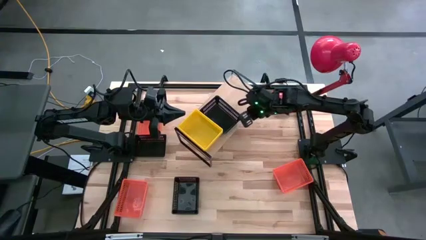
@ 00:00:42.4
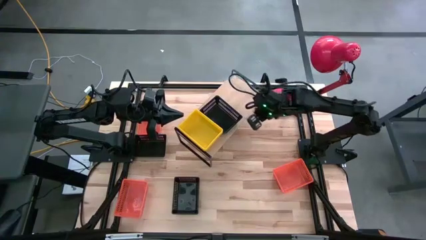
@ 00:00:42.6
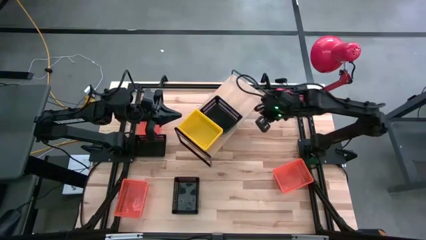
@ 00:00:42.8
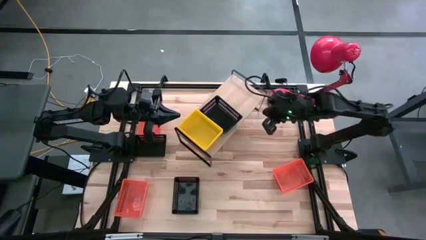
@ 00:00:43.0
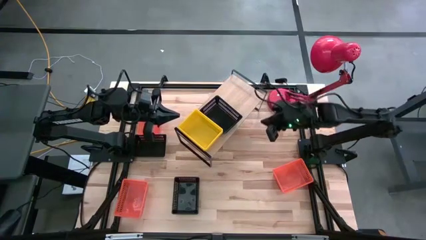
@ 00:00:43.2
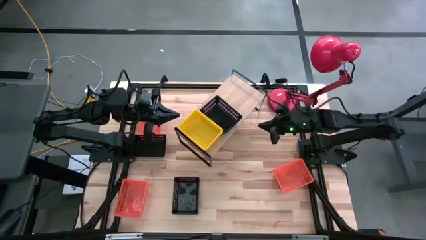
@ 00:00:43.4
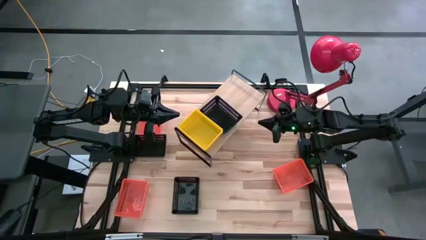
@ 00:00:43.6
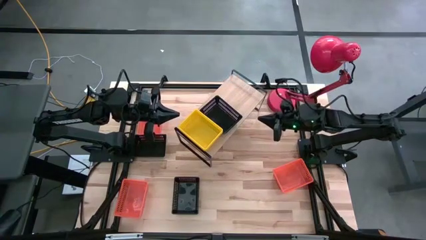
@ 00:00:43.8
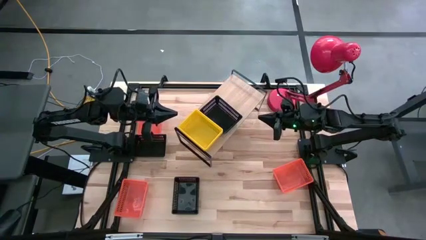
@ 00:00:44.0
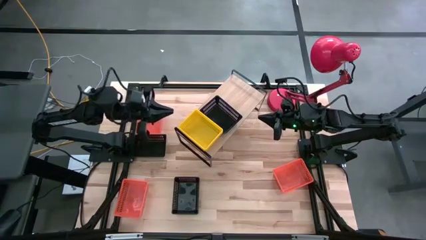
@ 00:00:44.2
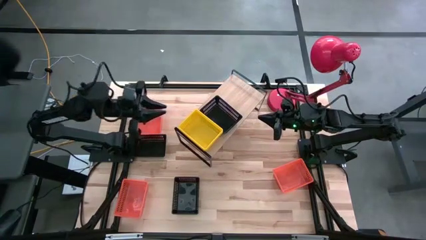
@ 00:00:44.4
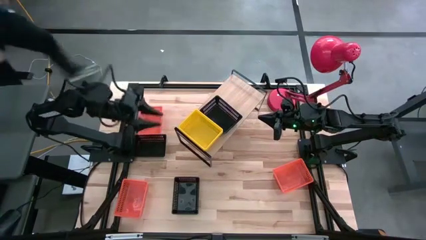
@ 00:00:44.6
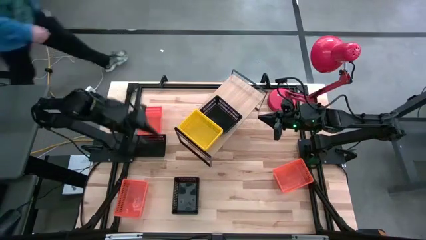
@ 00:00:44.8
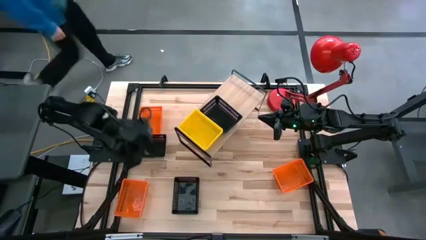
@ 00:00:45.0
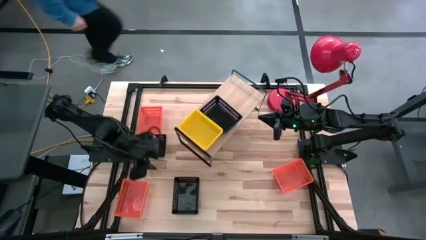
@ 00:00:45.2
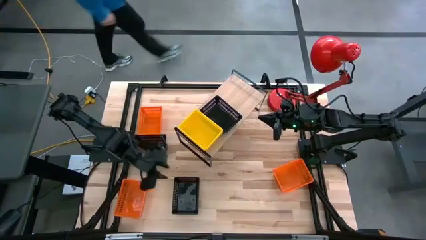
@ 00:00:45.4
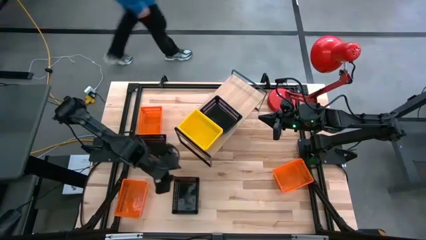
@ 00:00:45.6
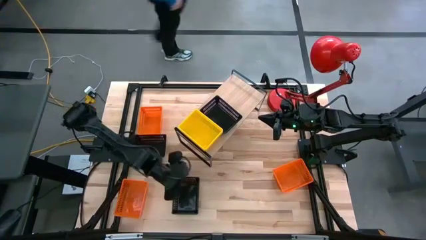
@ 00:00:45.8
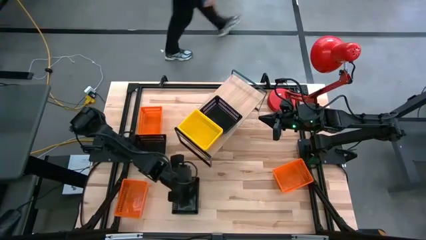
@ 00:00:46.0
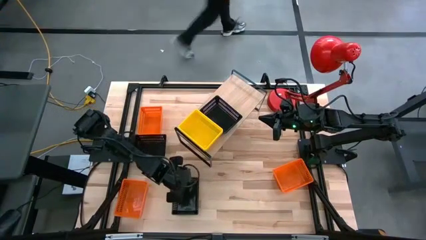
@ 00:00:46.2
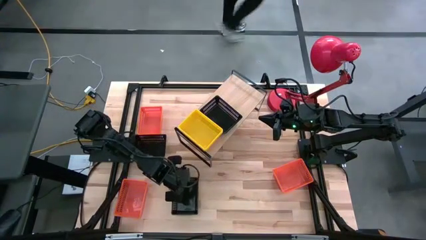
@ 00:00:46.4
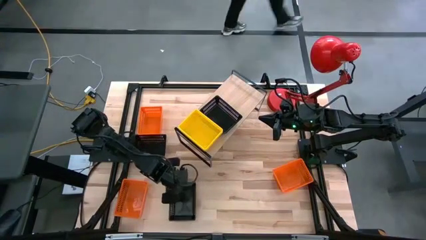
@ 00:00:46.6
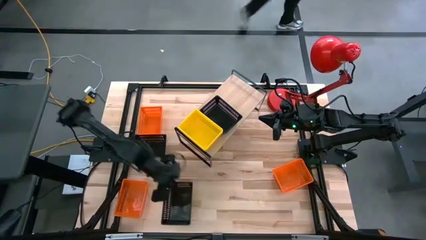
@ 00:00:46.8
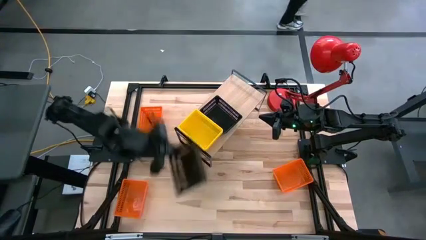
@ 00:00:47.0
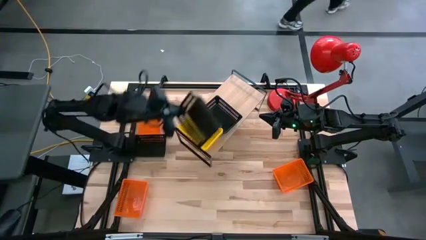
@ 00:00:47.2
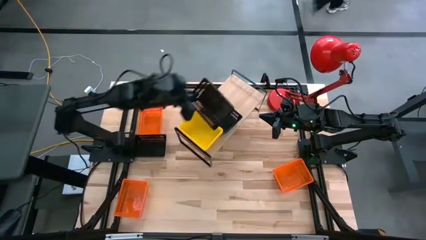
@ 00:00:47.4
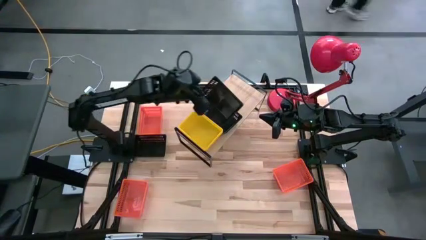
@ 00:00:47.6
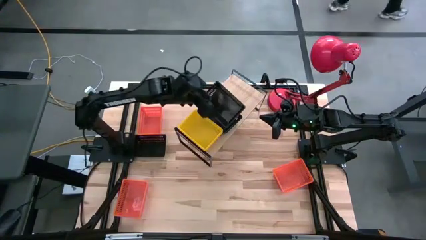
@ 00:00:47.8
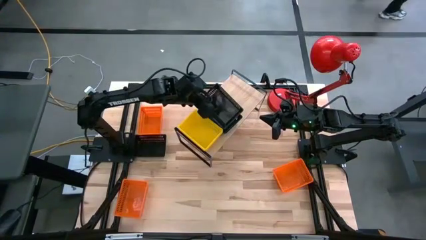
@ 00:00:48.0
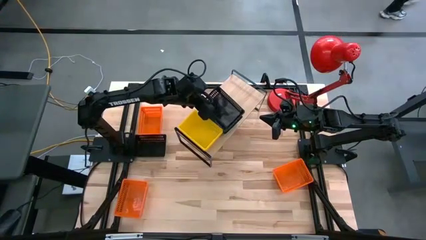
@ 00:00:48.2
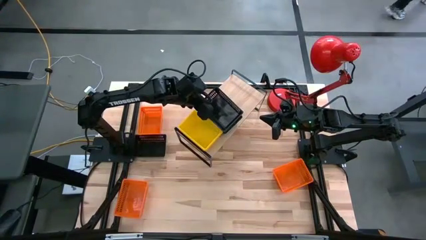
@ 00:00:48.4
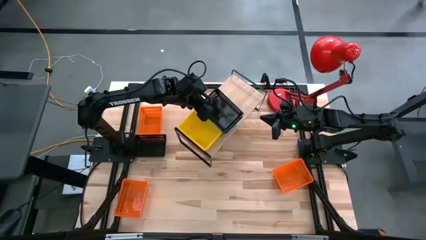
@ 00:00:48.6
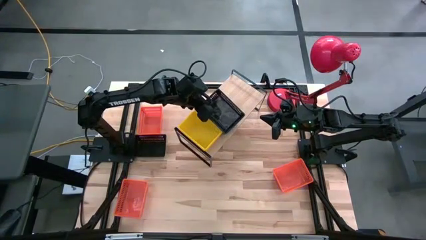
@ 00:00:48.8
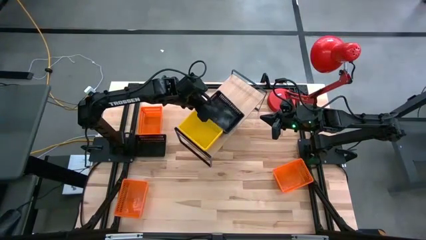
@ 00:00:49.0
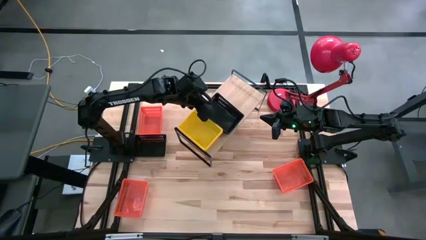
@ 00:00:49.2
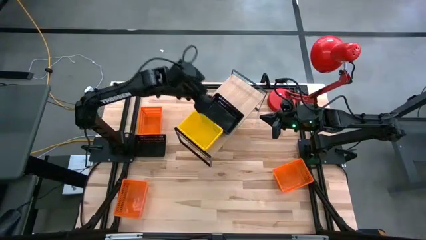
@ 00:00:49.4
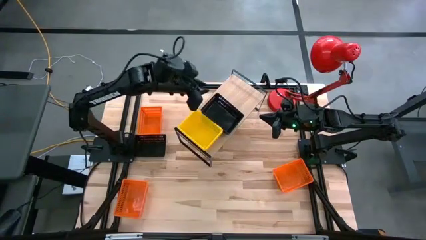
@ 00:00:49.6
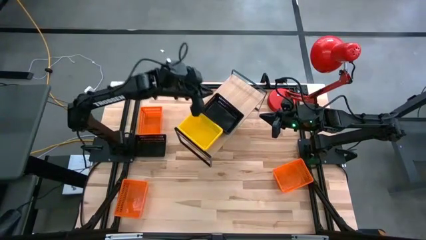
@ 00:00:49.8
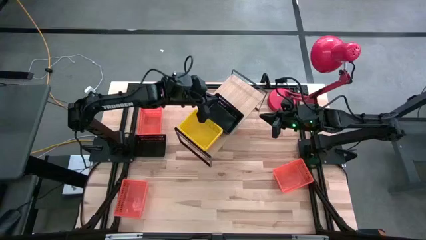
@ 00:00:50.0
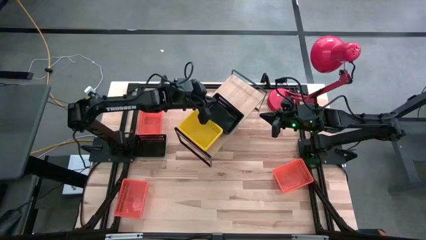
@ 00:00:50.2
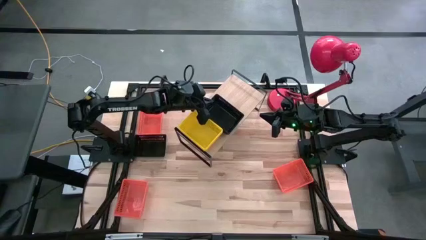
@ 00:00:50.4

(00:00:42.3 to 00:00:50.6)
Task: Stack baskets on shelf by color
Stack the bottom black bin on top of the black bin on the shelf

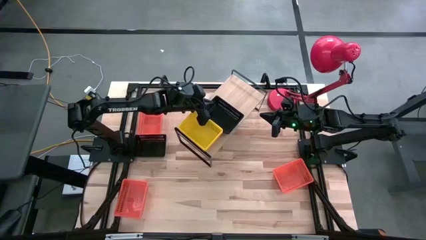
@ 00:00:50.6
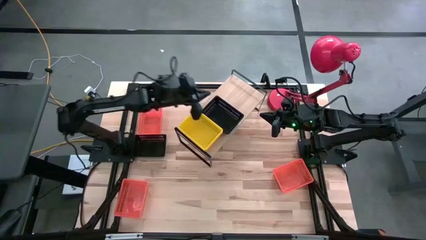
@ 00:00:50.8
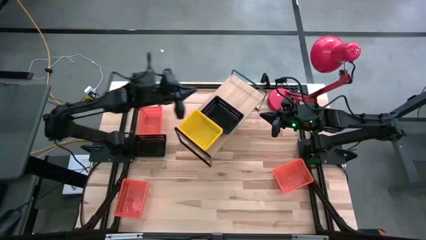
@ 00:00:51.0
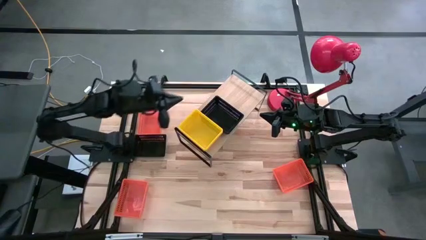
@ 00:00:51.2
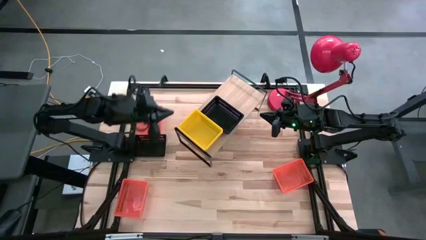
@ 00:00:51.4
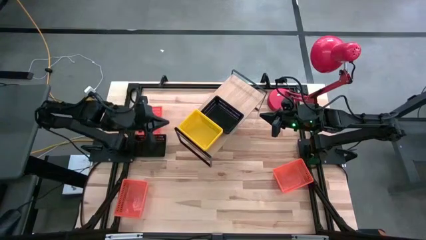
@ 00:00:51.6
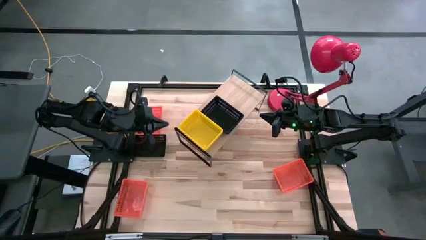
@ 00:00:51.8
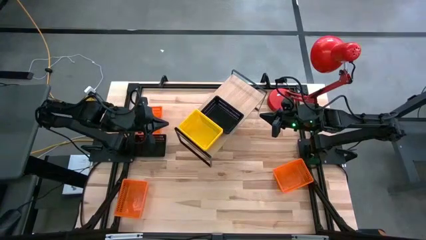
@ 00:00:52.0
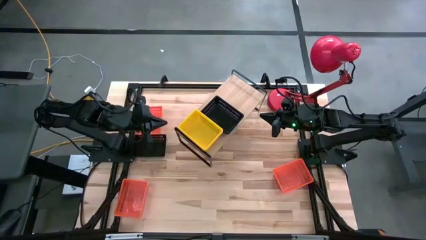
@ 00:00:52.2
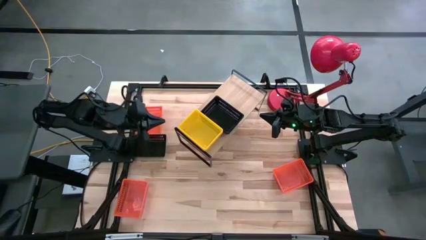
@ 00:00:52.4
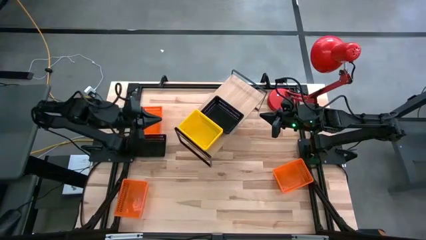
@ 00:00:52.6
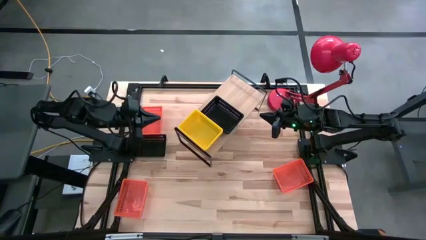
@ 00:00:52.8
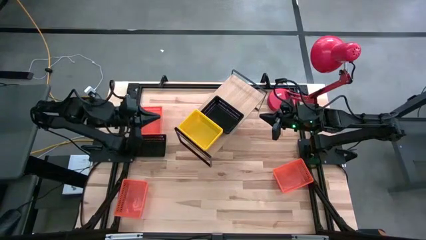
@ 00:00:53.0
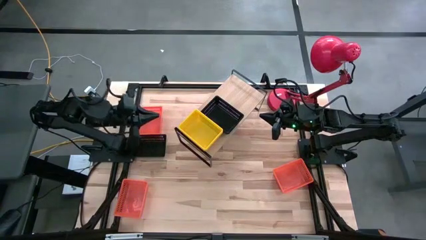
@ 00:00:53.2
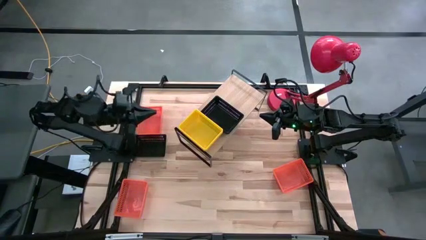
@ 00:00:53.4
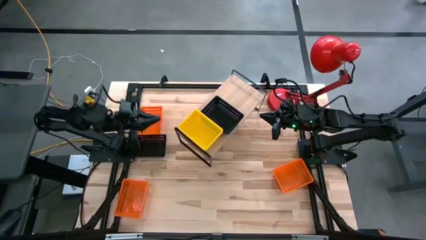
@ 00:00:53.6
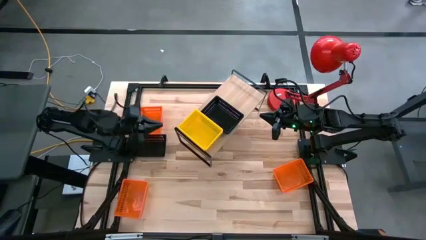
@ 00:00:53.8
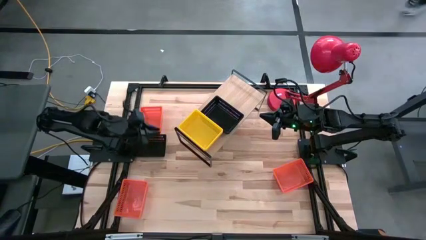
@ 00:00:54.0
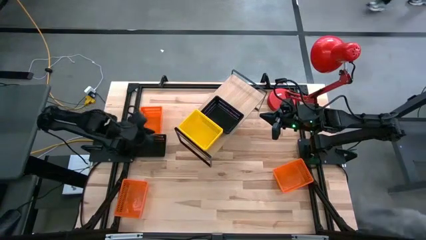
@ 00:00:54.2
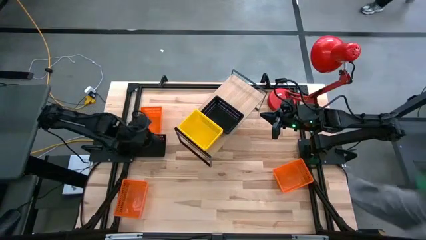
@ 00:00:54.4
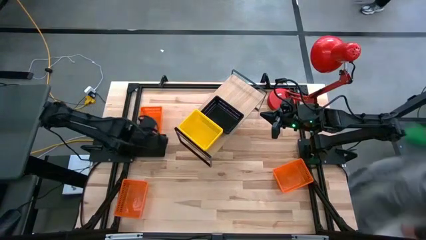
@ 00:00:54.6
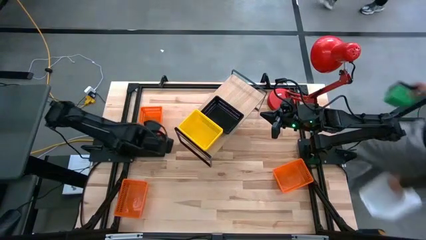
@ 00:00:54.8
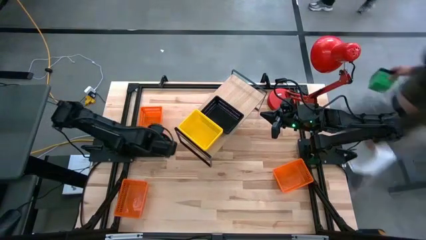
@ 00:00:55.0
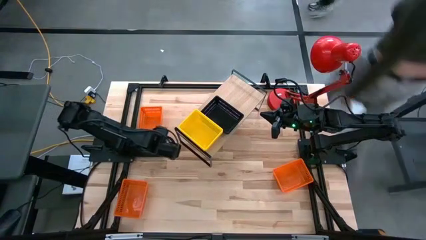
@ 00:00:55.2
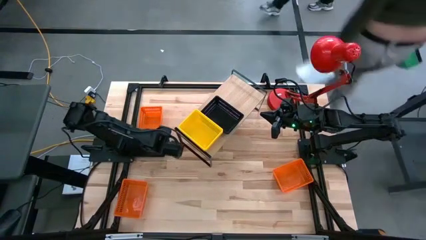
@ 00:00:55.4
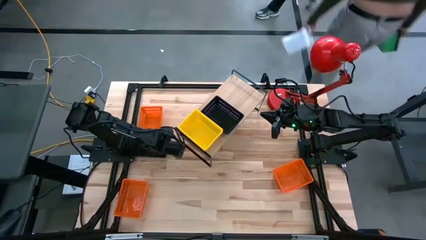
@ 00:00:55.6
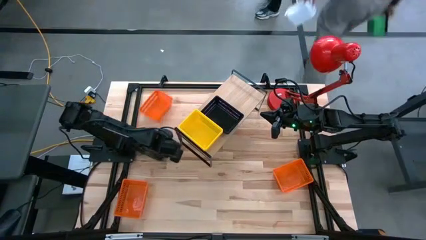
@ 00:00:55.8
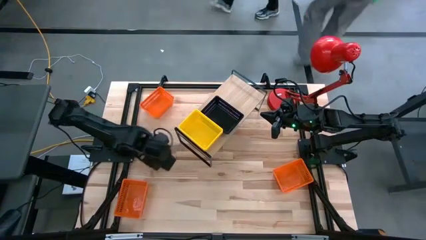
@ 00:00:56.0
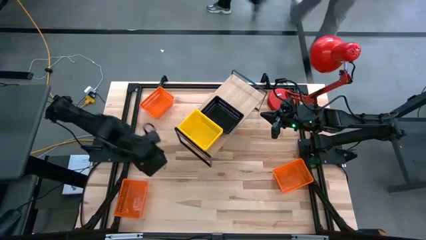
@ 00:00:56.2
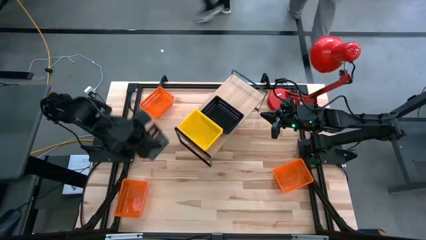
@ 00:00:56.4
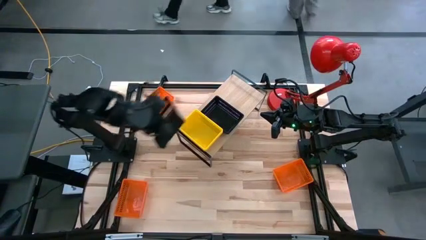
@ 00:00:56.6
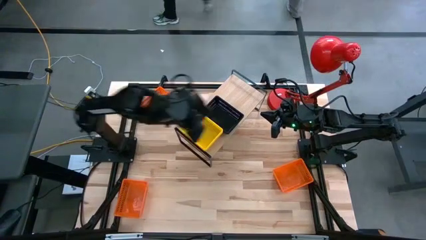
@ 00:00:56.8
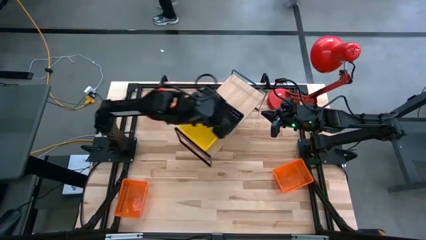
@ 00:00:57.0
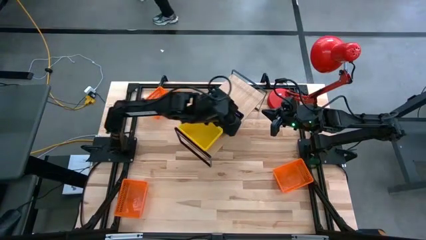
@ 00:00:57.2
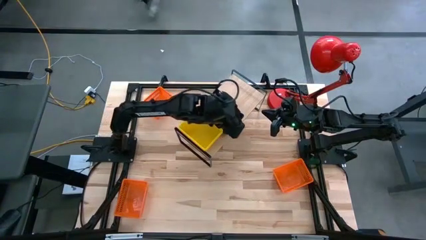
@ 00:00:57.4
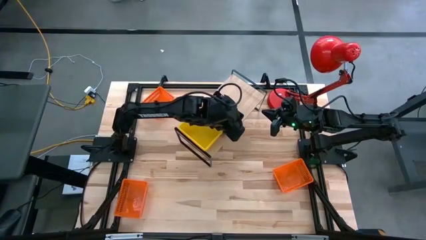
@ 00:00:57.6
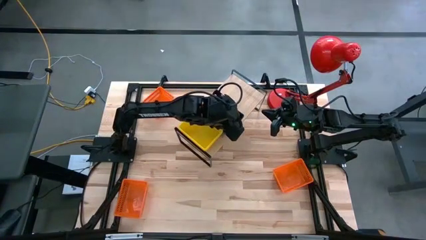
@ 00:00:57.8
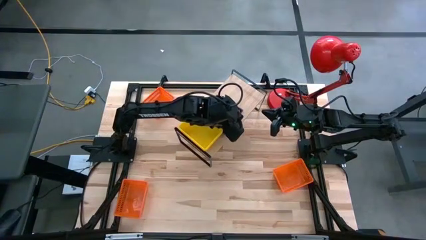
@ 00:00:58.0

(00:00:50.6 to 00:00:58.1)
Stack the black bin on top of the black bin on the shelf

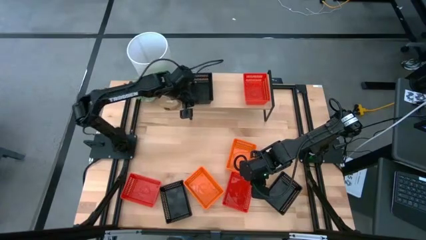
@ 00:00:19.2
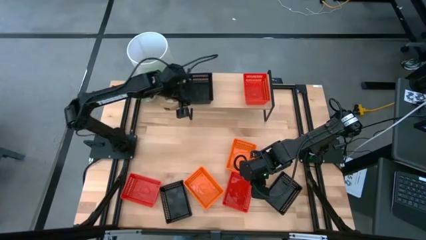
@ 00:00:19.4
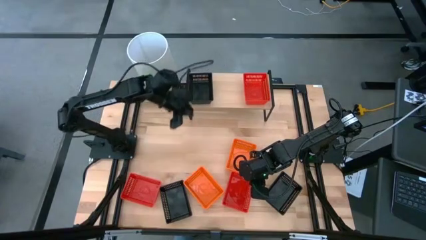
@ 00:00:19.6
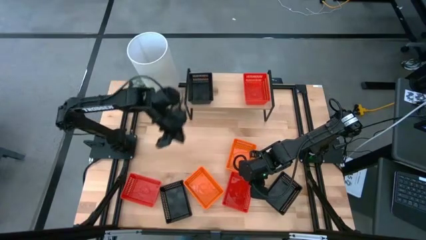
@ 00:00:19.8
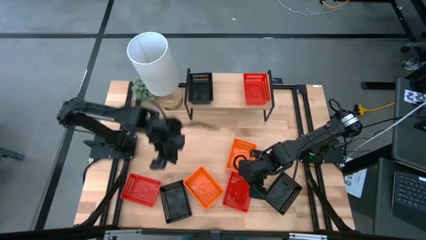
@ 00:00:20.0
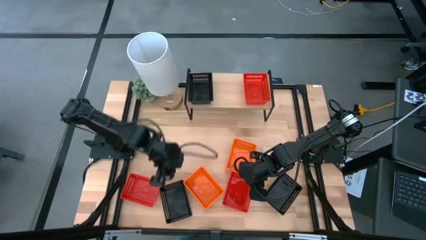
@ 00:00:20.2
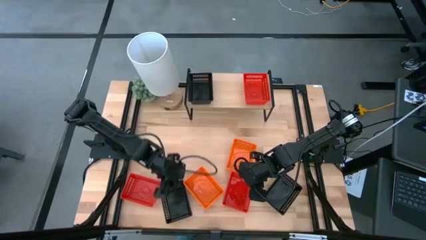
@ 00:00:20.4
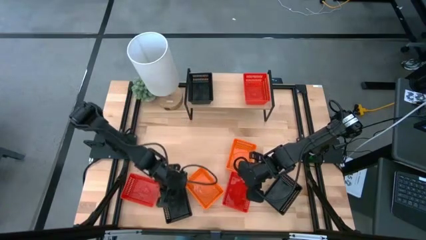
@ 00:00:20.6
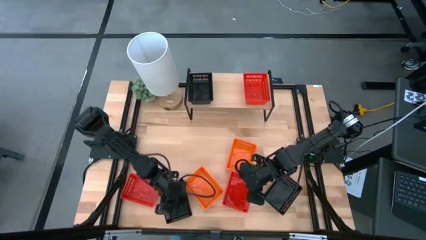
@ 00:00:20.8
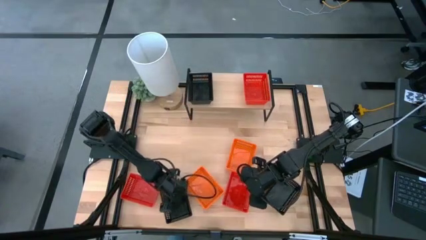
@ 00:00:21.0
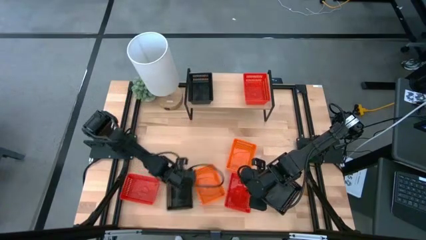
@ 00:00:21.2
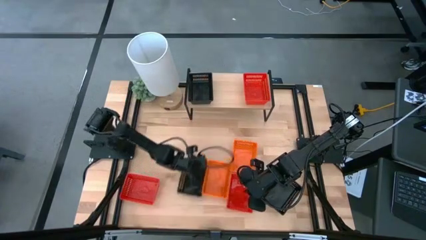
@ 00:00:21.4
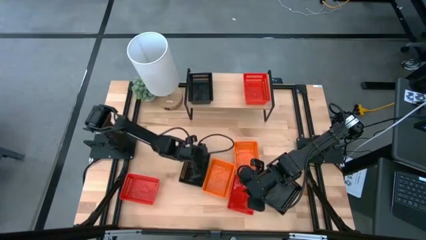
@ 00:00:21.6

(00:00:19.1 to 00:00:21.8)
Task: Stack baskets on shelf by color
Move the black bin to the middle of the table
